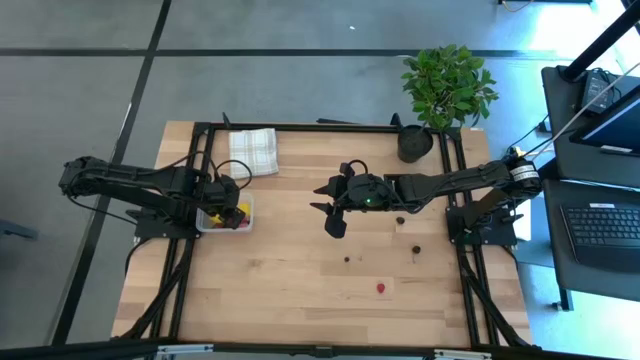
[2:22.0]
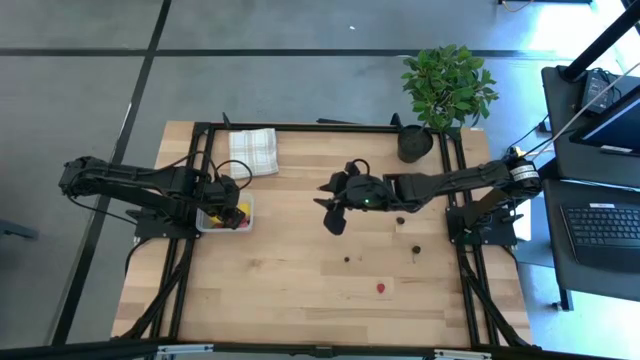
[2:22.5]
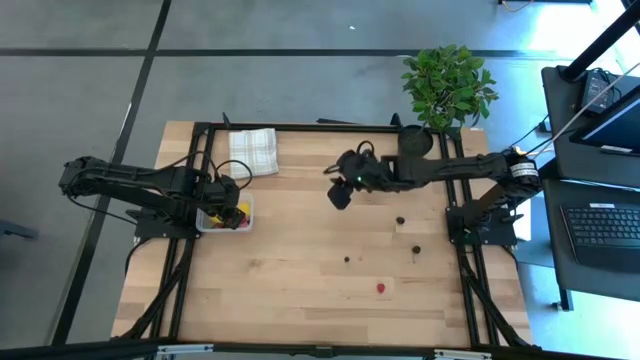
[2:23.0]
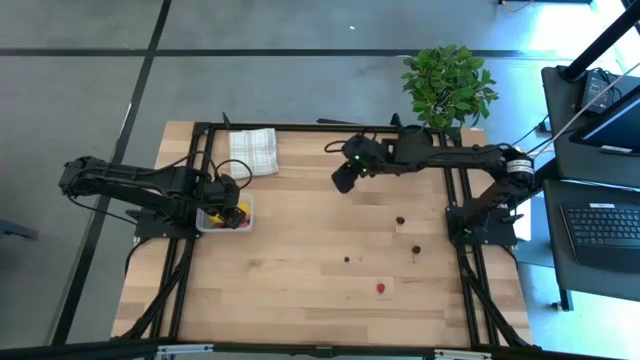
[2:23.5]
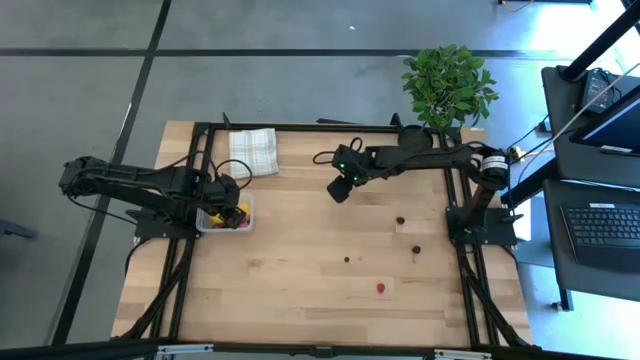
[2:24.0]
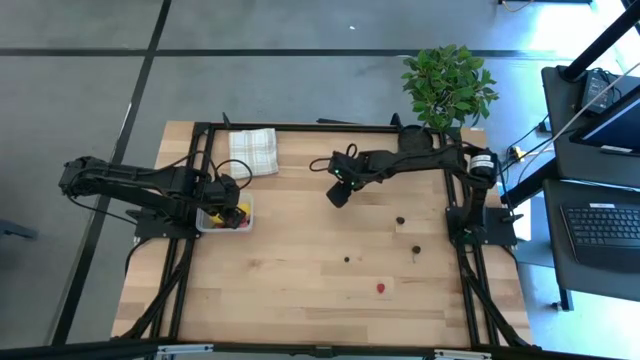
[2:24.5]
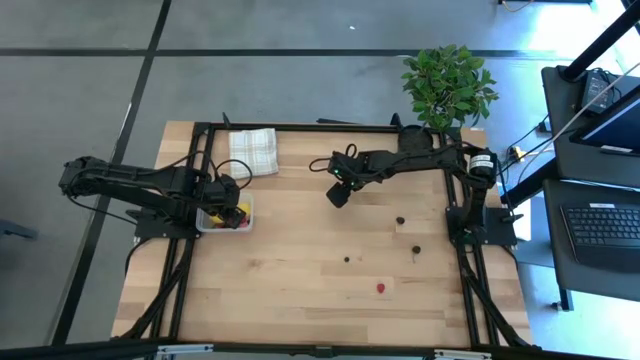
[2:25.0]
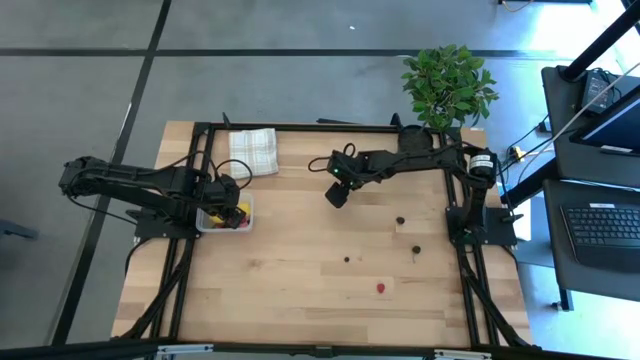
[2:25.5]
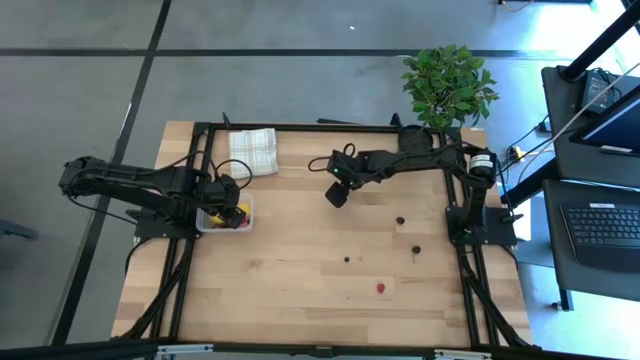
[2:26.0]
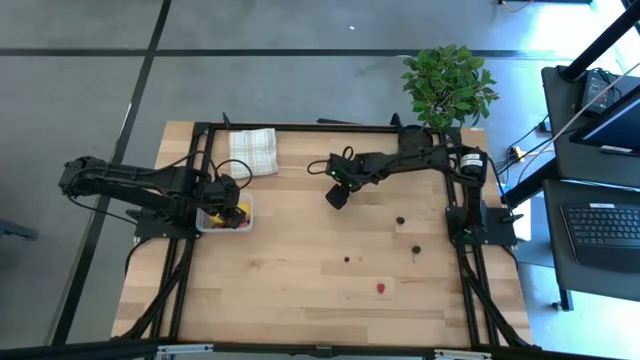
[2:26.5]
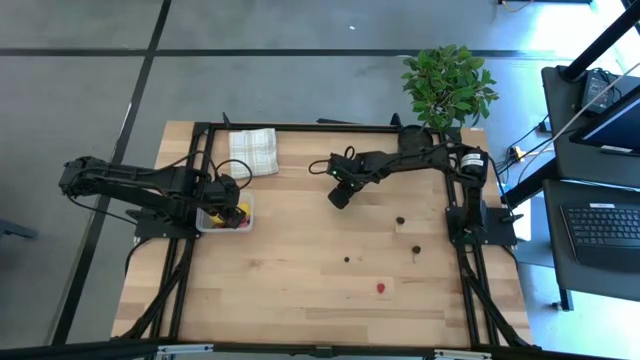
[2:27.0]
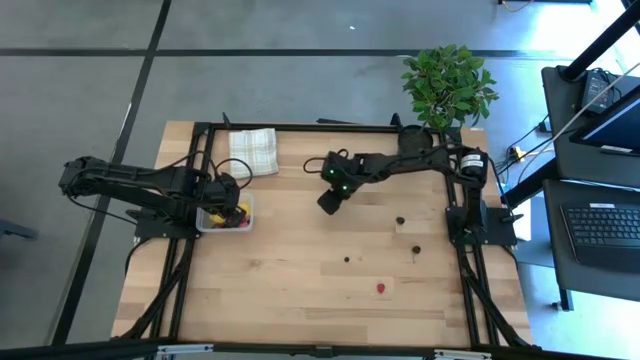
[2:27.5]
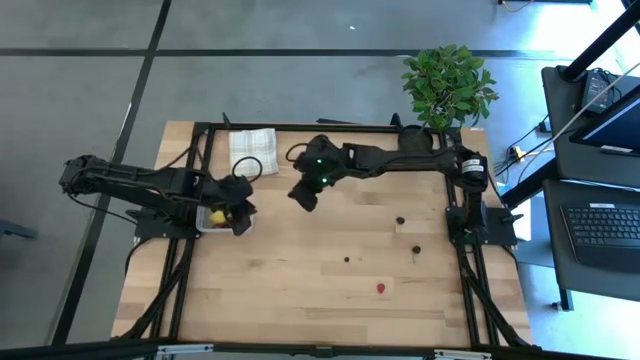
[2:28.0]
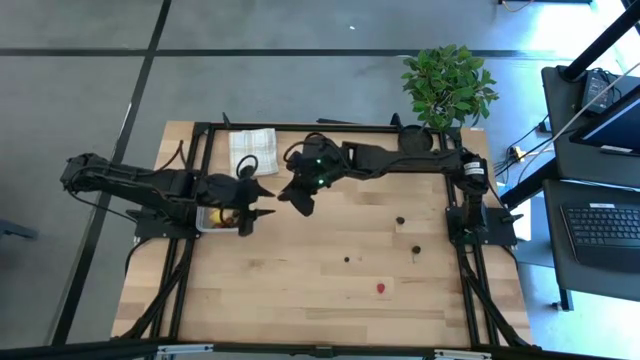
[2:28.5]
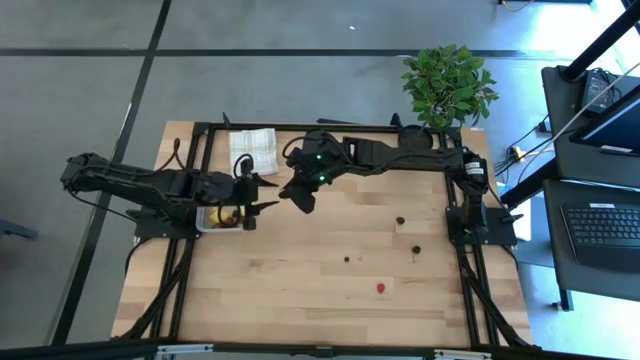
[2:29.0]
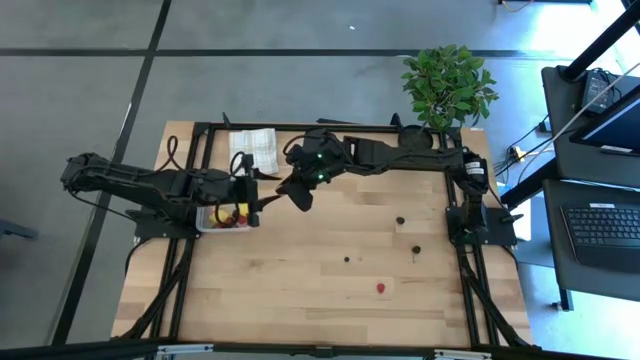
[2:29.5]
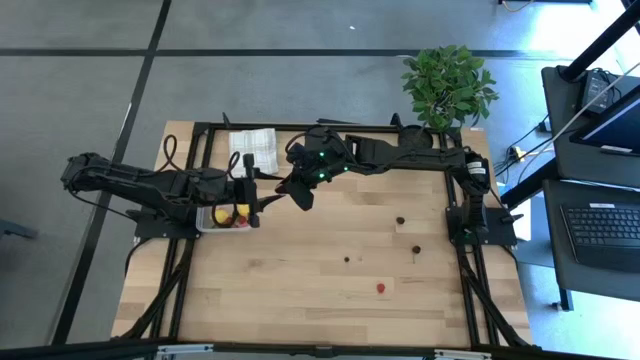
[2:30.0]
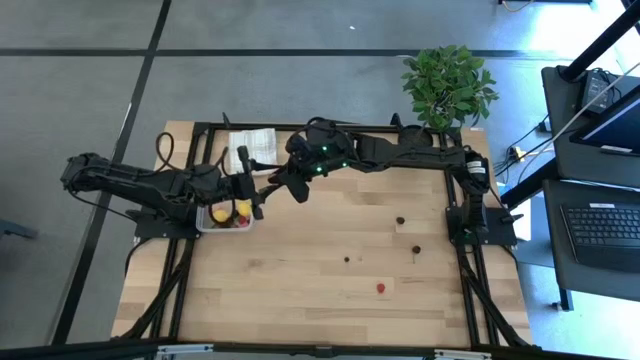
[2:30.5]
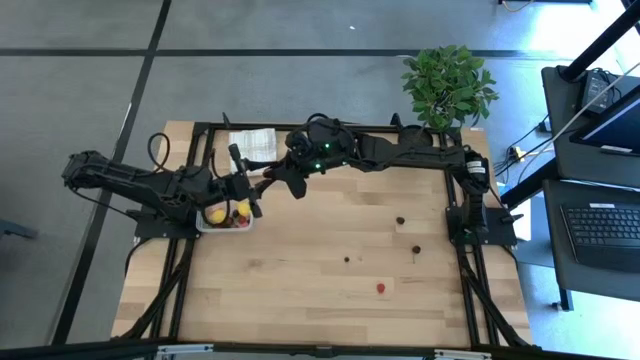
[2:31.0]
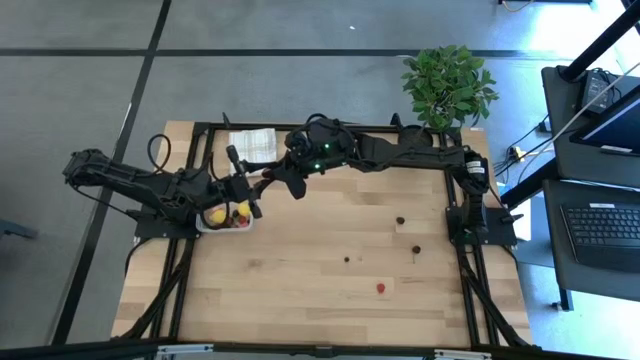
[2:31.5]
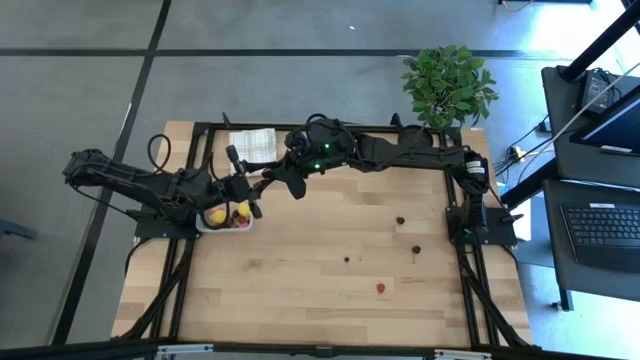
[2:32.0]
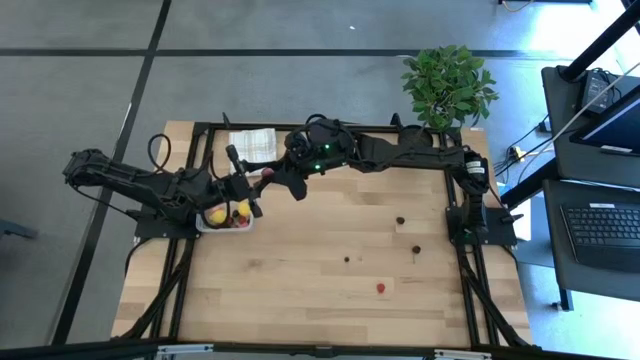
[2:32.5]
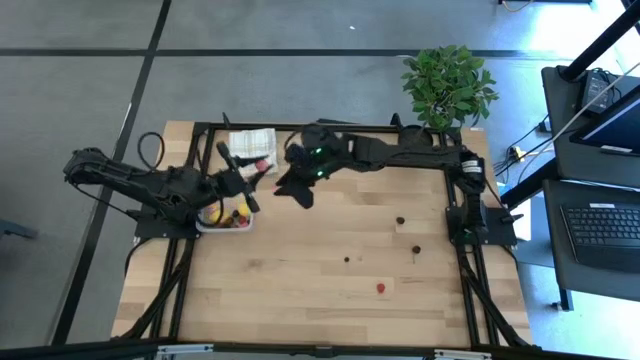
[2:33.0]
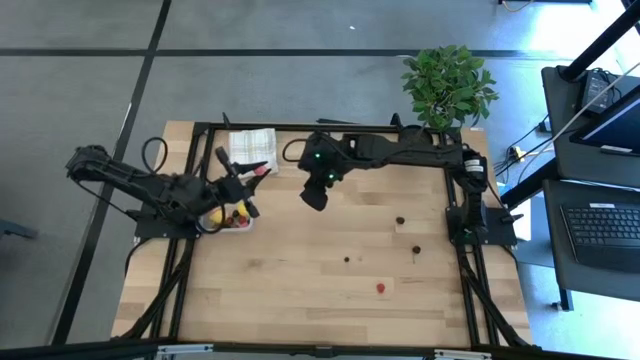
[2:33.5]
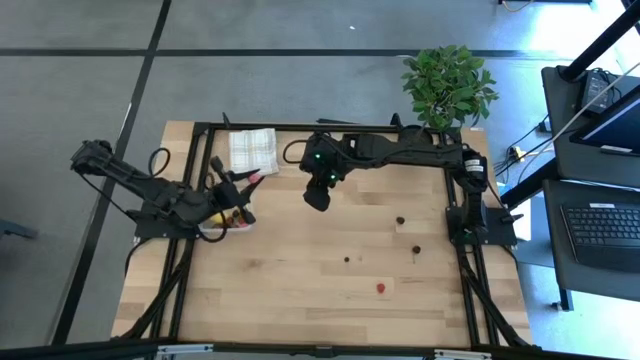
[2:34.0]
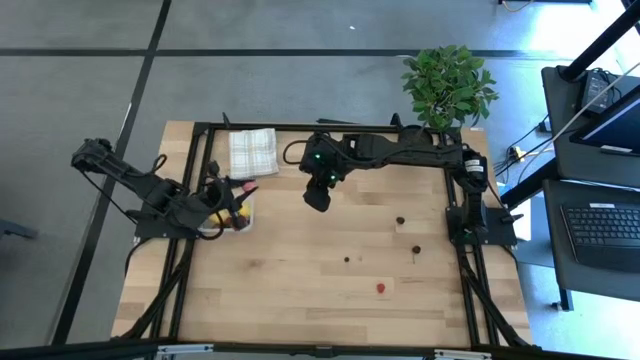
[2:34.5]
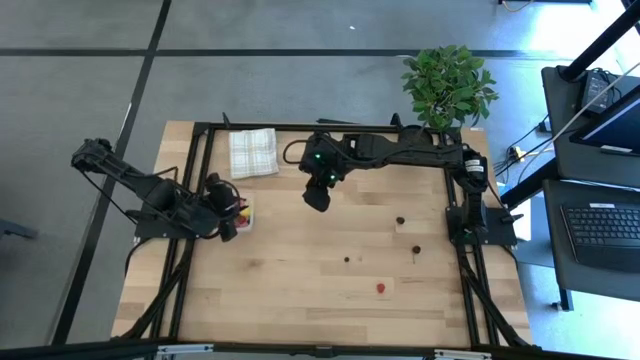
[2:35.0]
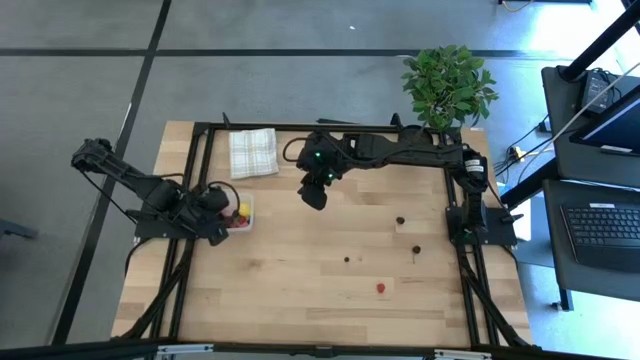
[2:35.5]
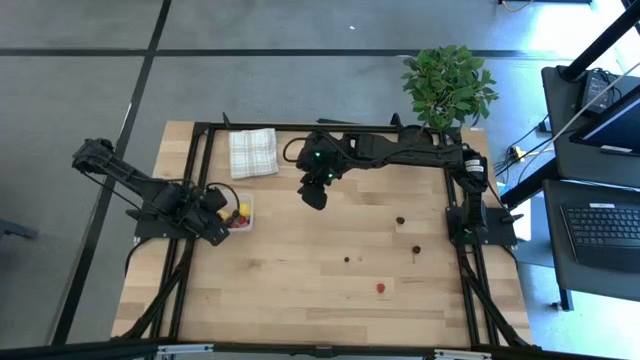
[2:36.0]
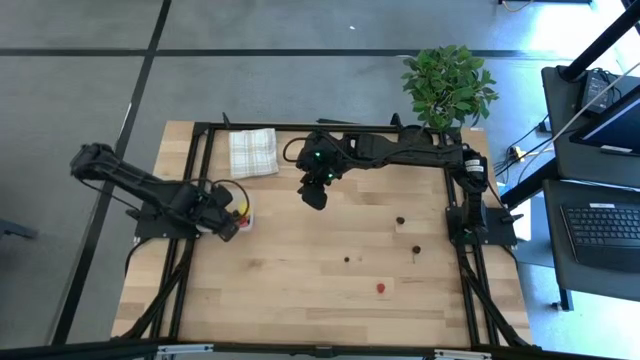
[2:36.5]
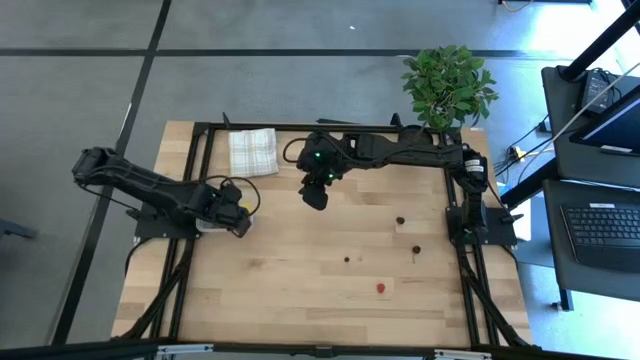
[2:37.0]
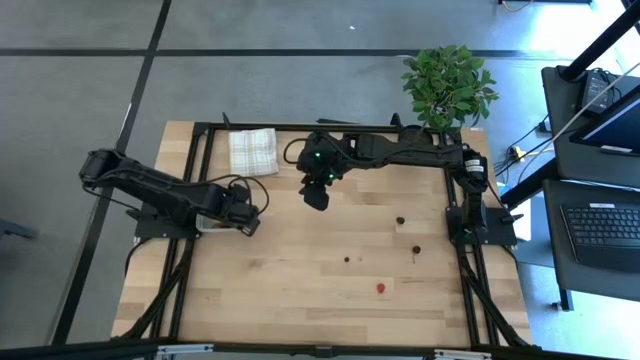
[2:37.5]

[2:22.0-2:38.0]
Task: Pick and placing Produce into tupperware
Put the pink peach into the transparent bin

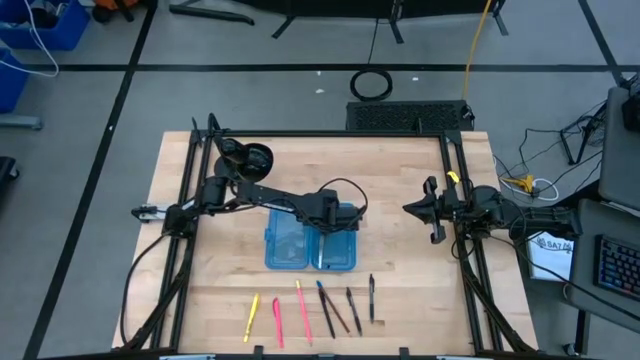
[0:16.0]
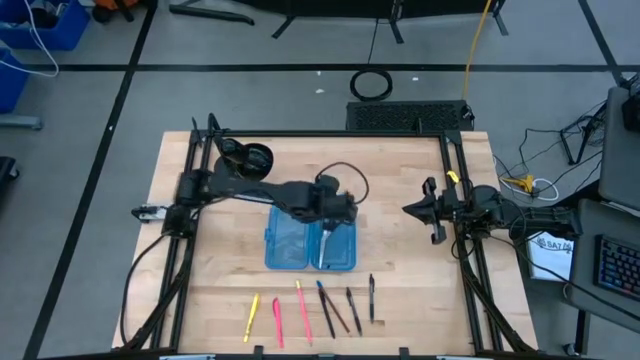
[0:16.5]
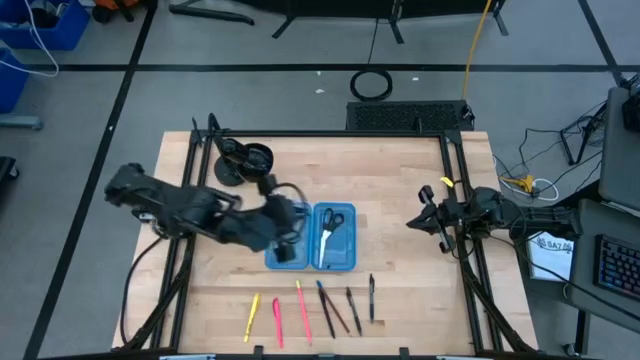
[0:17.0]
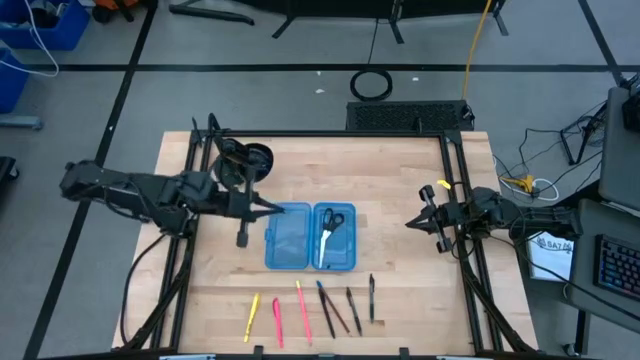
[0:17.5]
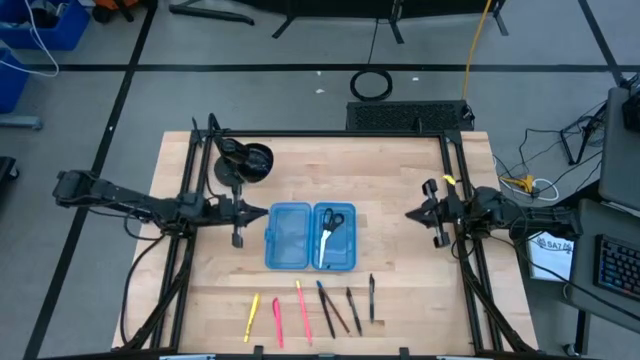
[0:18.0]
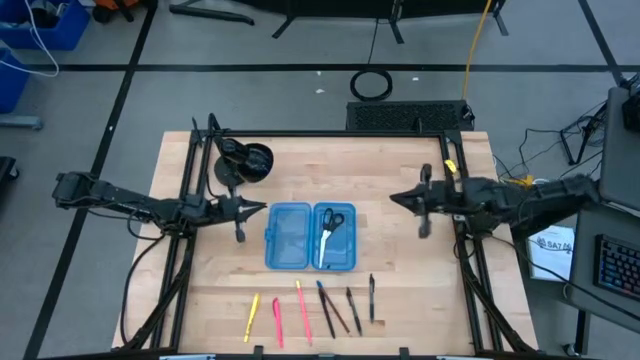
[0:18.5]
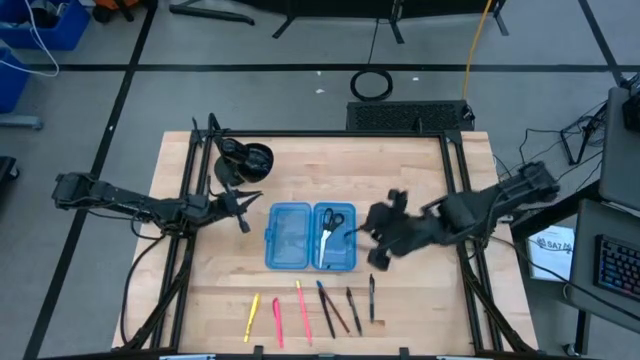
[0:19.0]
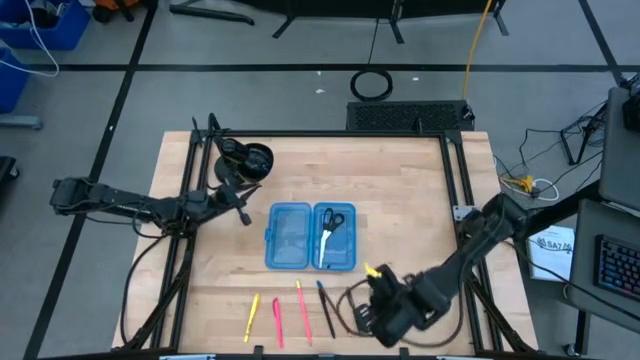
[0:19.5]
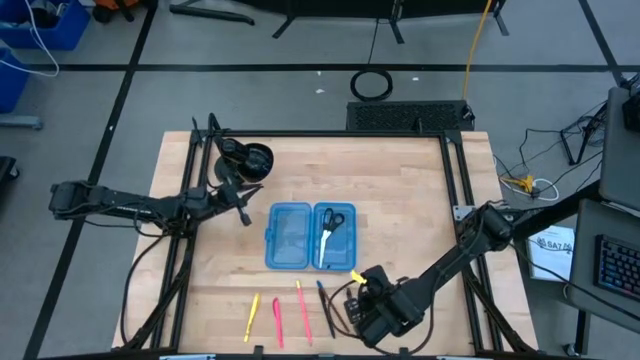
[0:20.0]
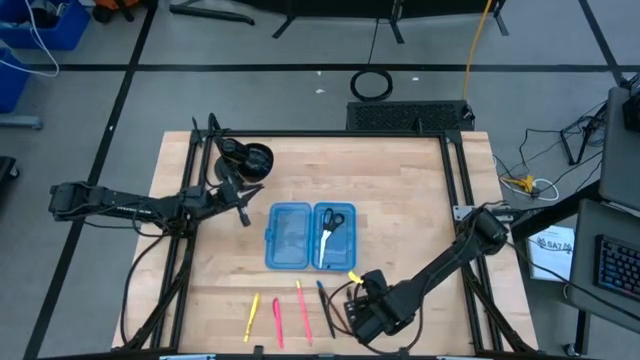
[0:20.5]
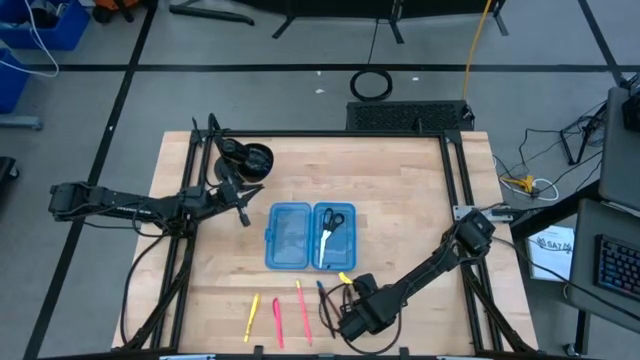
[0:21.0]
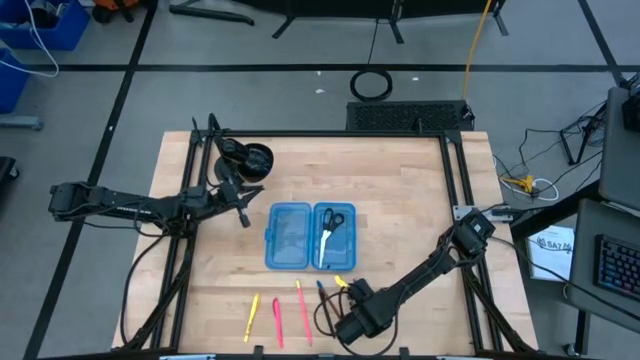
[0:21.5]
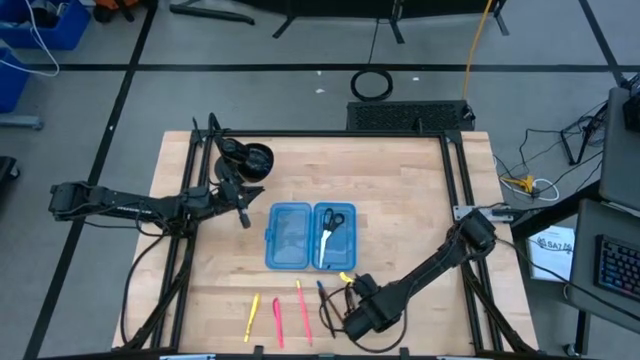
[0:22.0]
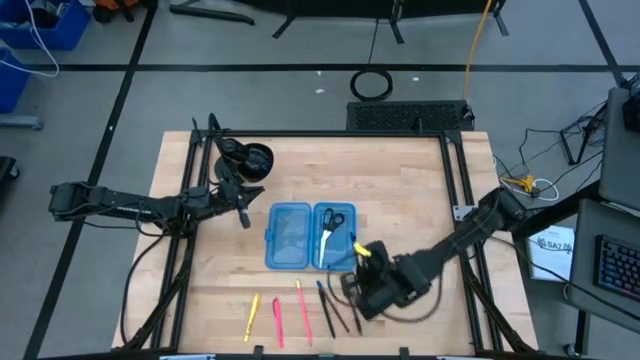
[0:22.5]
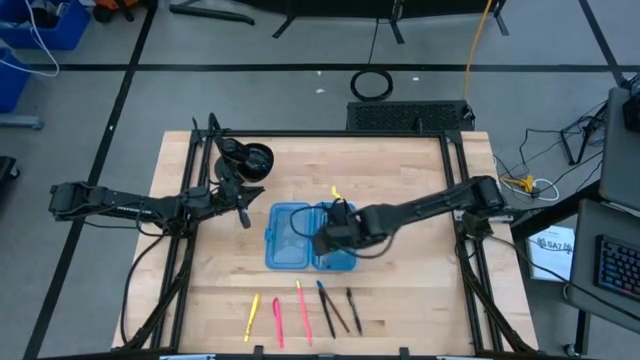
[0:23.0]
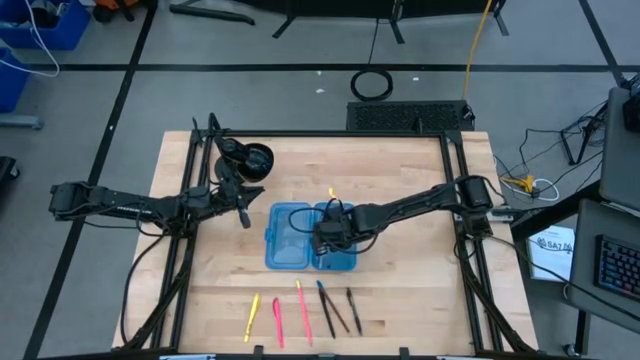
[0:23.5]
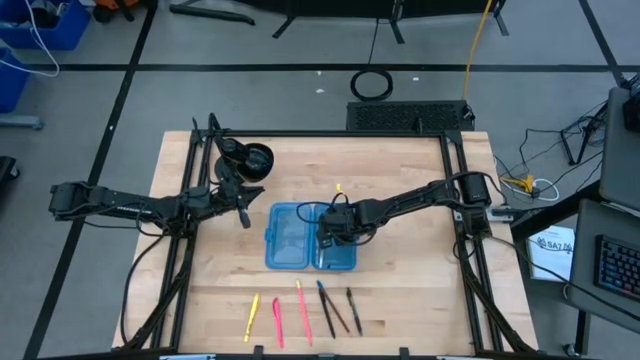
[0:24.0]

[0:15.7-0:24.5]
Task: Pick & place school supplies into a supply box
Put the right black transparent pen into the blue supply box
